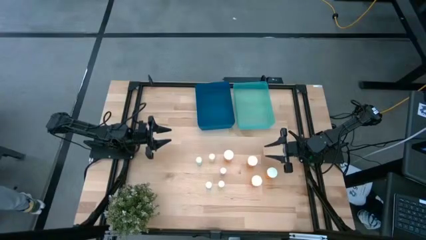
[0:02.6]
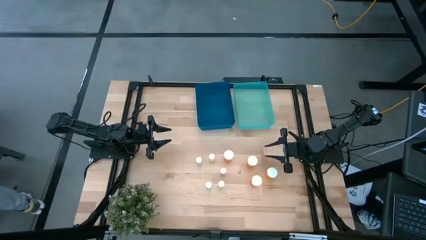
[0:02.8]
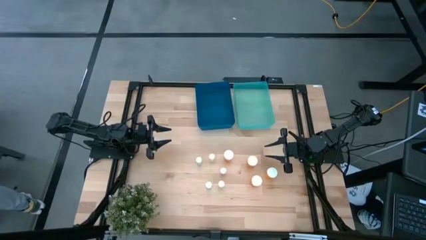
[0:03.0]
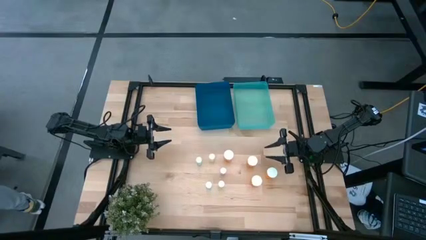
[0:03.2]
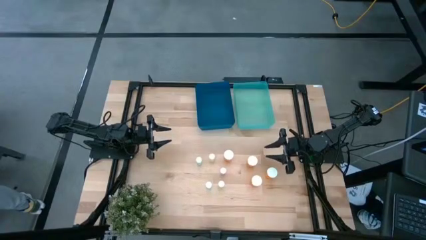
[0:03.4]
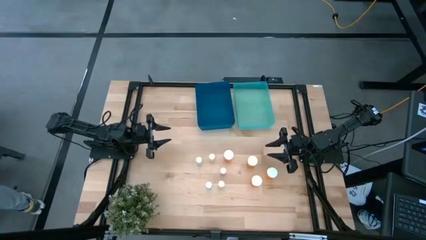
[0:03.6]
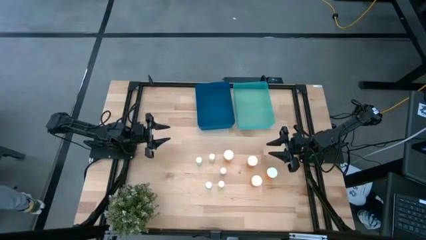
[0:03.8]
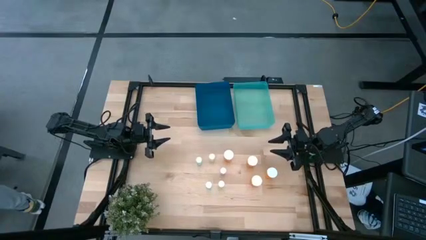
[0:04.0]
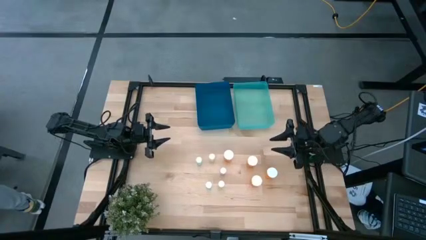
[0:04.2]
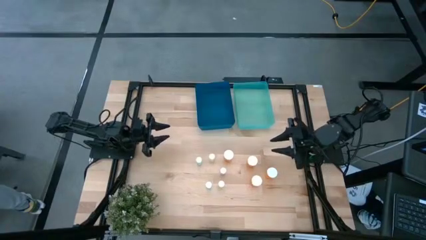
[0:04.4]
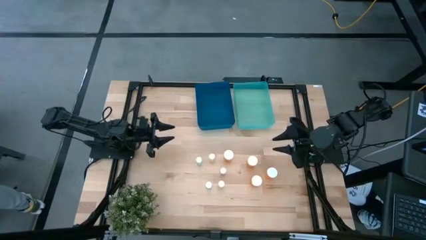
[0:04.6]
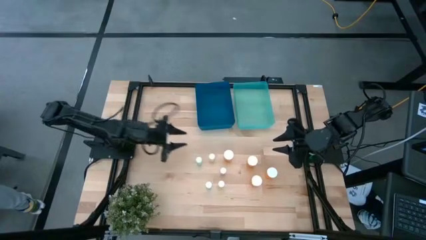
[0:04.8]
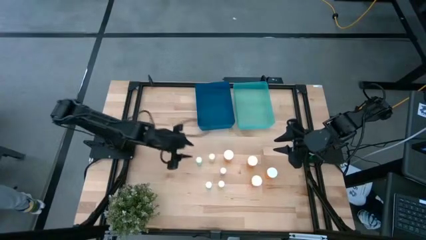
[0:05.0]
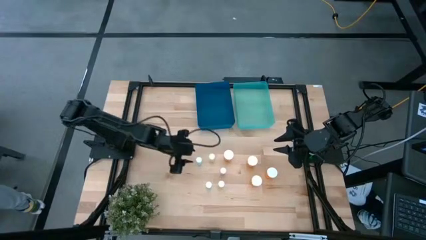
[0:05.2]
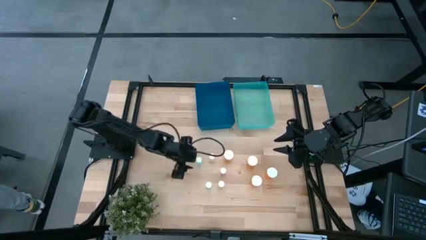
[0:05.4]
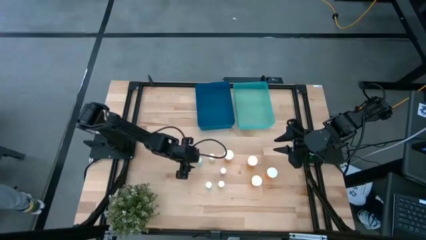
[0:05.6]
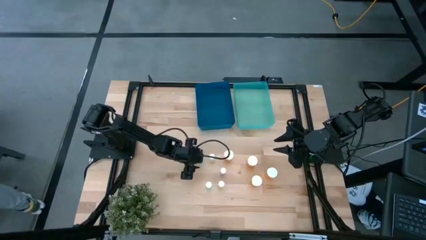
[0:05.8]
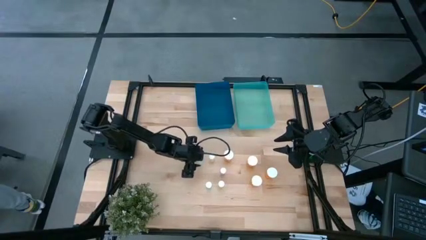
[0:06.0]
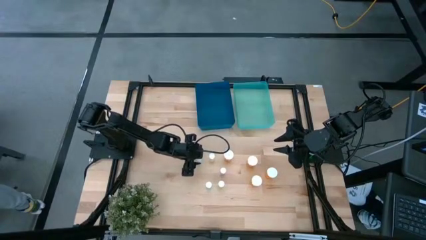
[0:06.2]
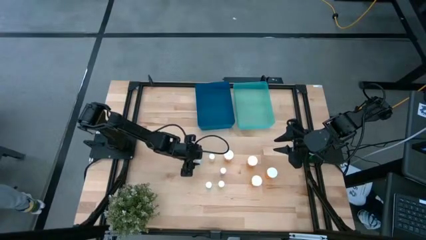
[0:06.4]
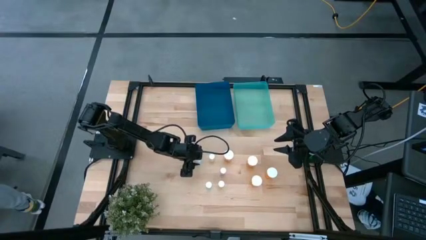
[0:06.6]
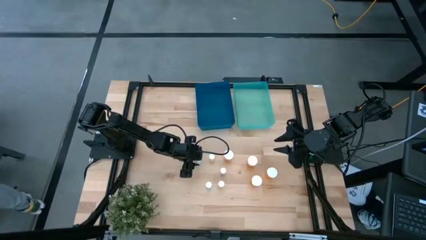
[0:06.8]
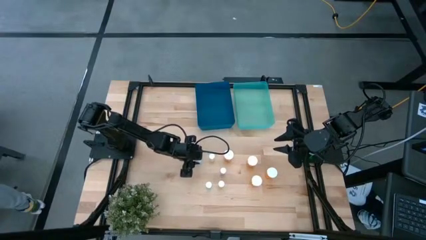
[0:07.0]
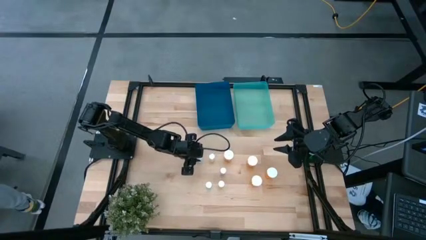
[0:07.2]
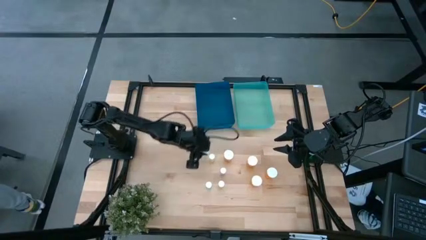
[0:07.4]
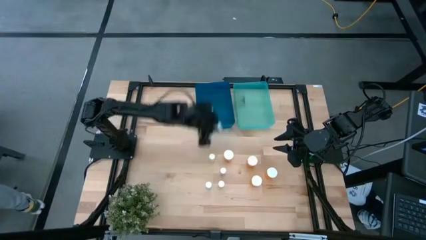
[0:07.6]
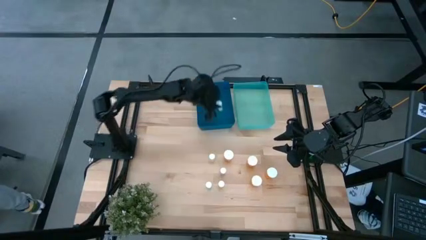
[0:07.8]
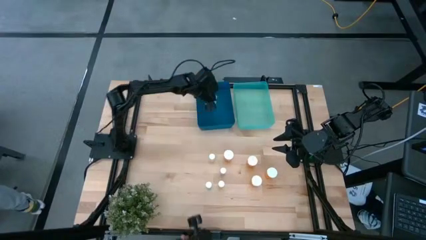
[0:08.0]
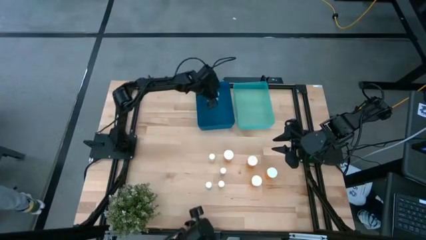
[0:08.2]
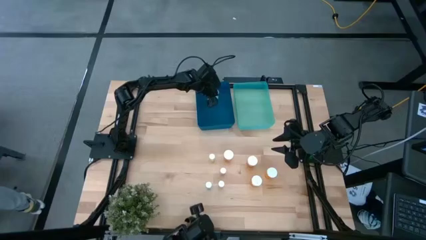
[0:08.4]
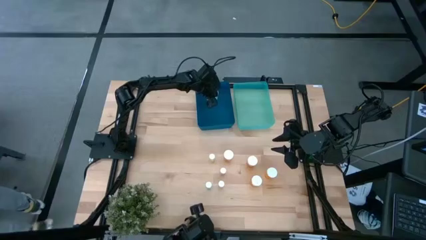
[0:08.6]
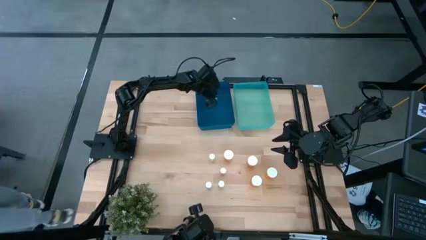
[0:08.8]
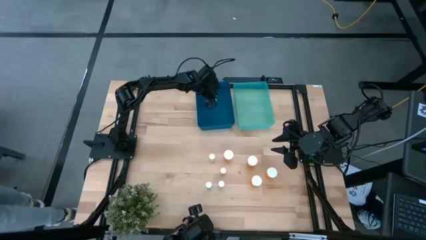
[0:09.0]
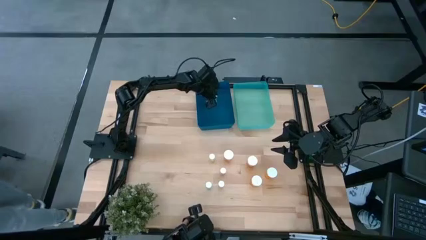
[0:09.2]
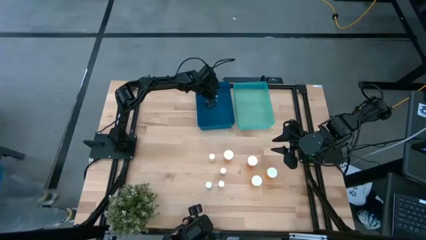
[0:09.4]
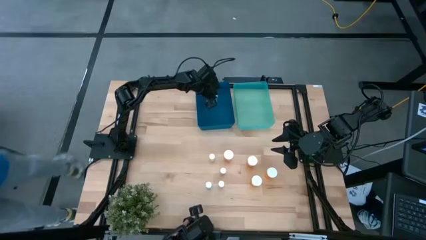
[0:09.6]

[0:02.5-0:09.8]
Task: Pick and place medicine bottles into bin by pill shape (circle, oval)
Put the blue pill bottle on the blue bin

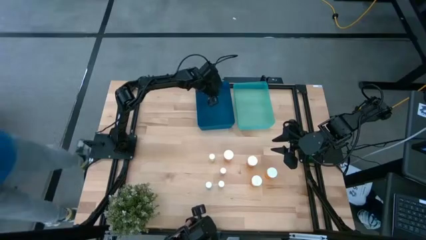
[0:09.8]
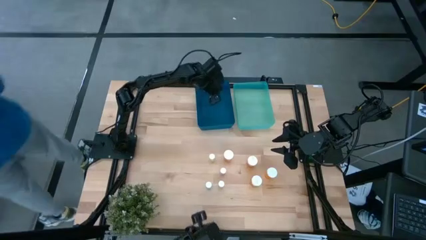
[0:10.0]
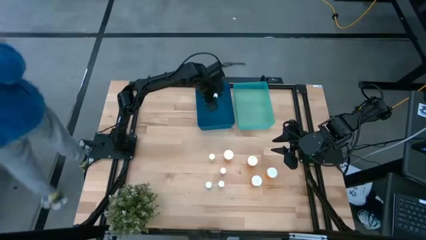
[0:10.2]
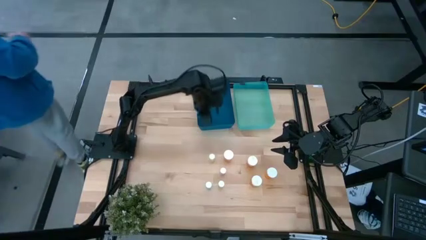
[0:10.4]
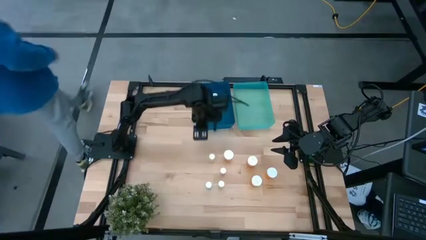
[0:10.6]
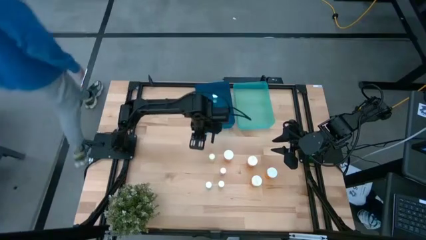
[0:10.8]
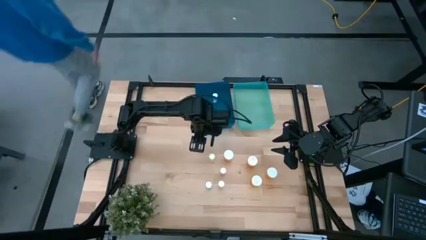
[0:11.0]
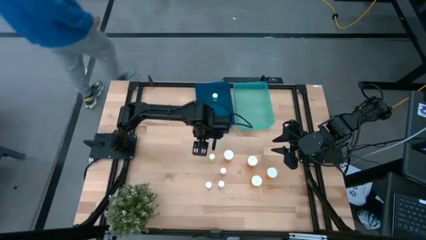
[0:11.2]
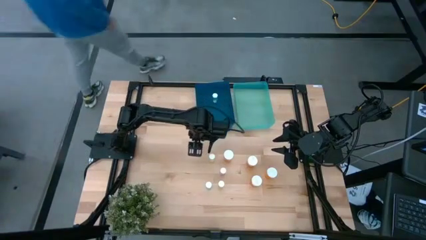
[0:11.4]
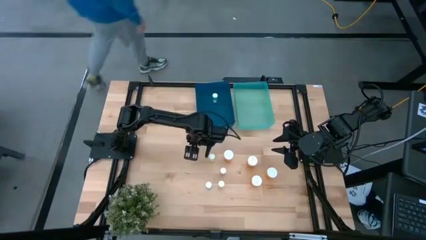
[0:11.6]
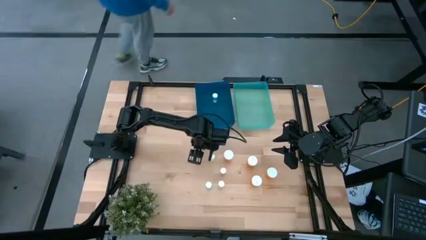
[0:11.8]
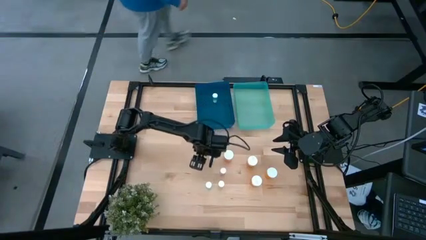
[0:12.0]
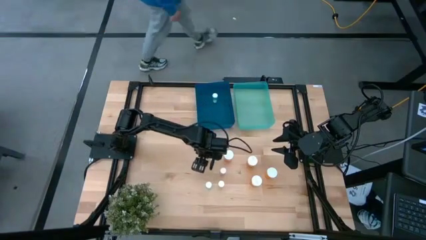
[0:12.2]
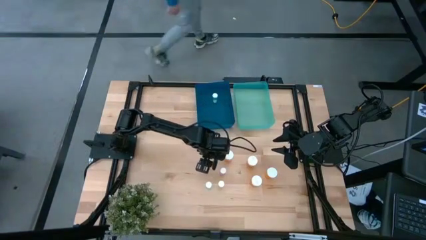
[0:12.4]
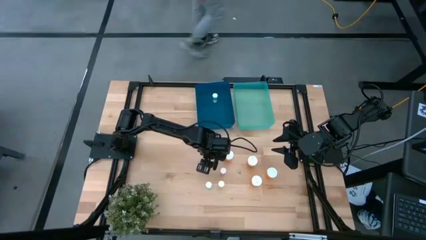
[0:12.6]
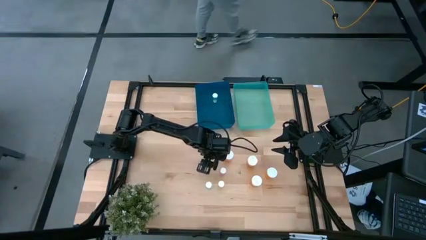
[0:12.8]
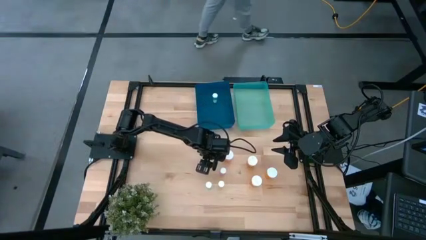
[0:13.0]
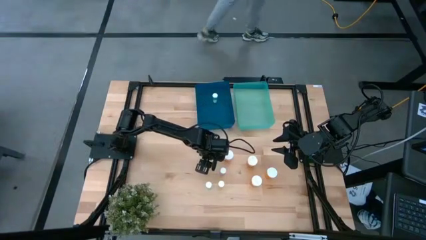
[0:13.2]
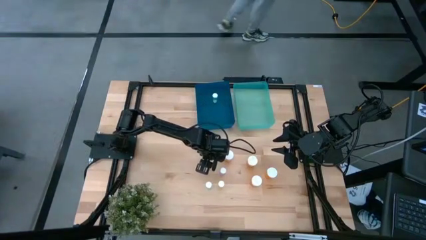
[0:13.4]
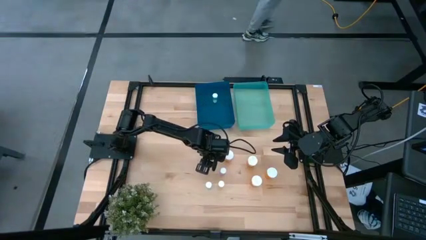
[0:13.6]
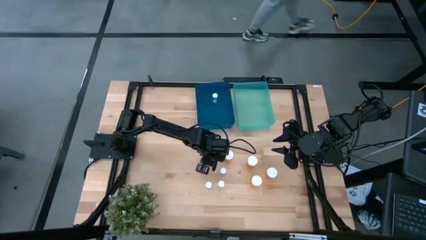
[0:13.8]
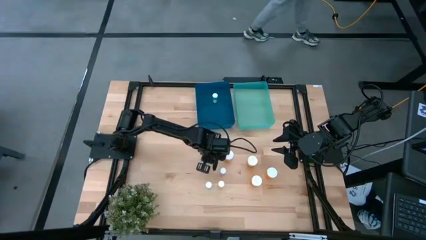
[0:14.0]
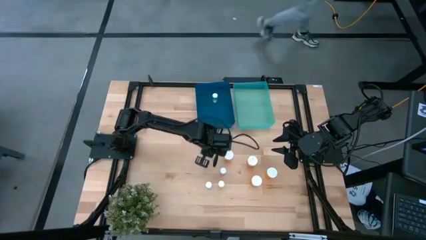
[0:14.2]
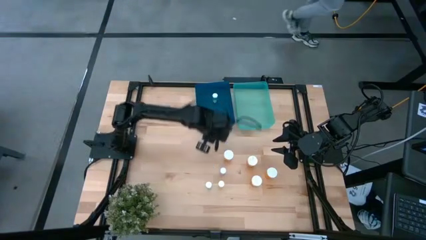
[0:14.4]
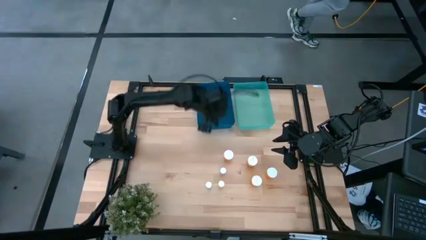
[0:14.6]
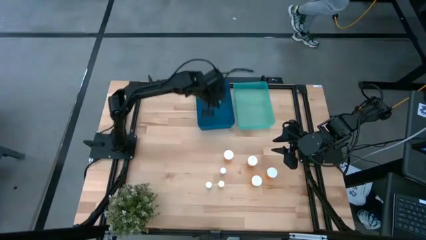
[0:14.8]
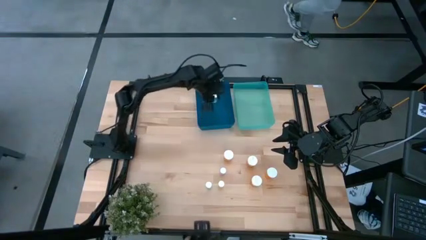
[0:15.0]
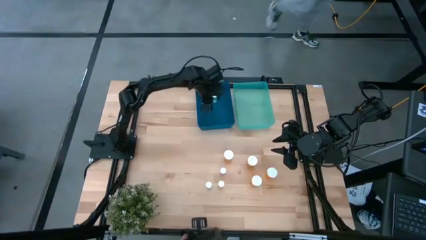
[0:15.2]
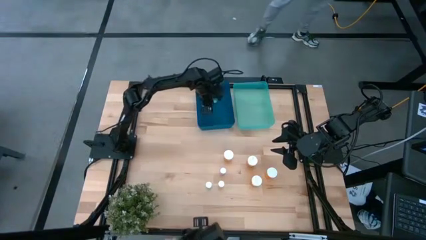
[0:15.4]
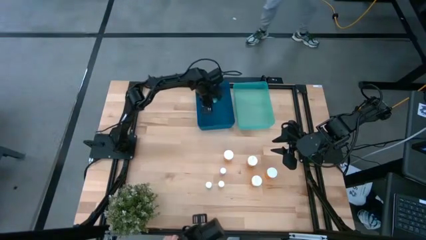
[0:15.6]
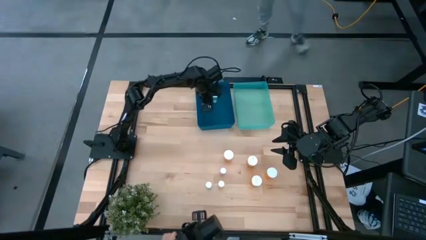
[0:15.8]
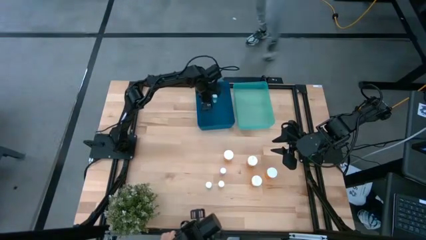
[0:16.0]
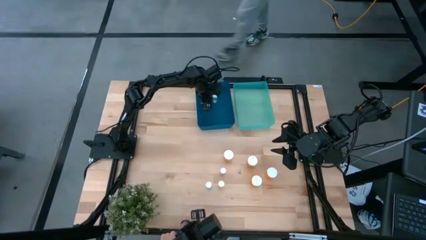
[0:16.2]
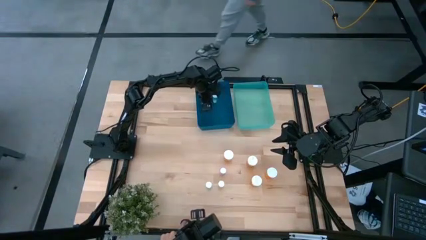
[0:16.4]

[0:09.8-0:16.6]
Put the yellow pill bottle on the blue bin

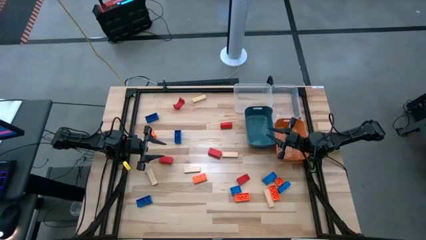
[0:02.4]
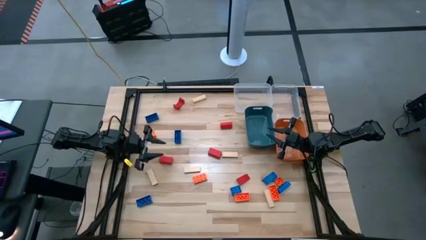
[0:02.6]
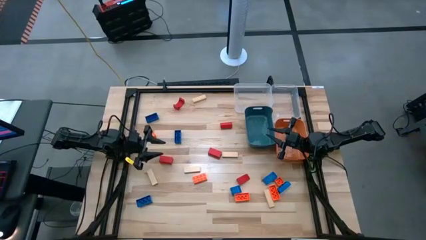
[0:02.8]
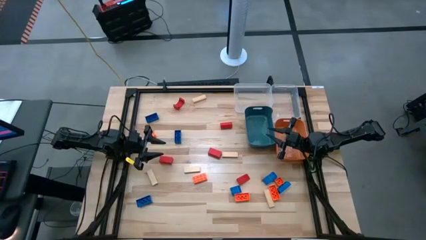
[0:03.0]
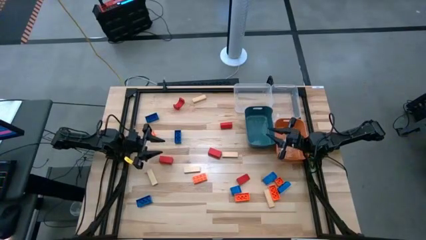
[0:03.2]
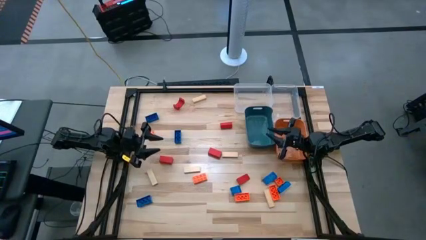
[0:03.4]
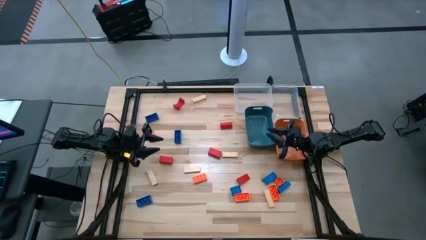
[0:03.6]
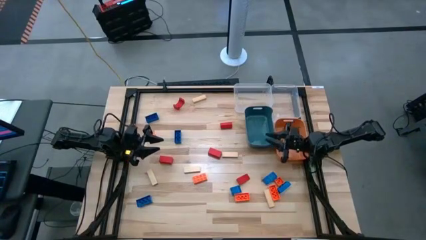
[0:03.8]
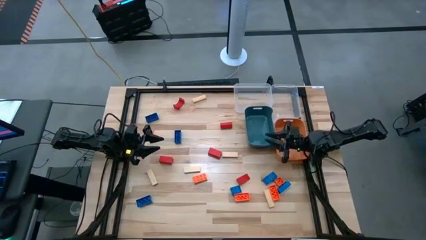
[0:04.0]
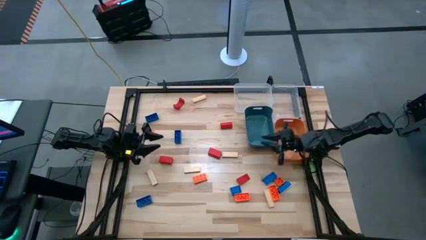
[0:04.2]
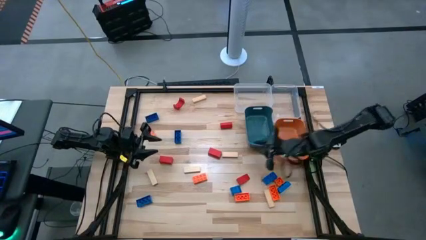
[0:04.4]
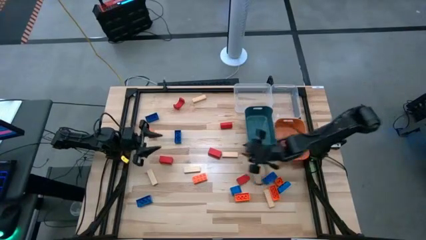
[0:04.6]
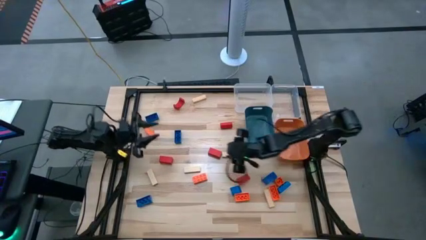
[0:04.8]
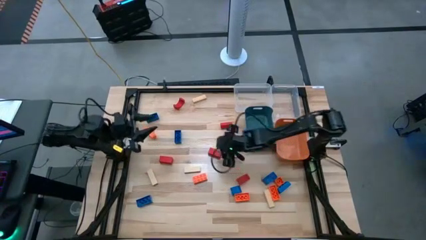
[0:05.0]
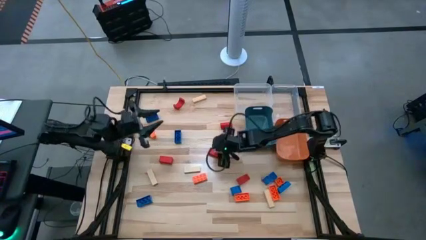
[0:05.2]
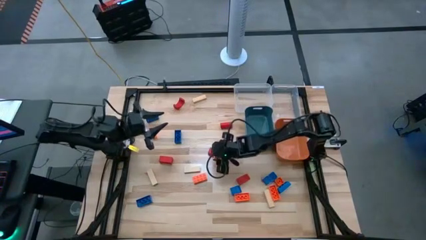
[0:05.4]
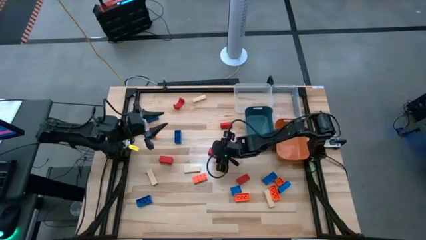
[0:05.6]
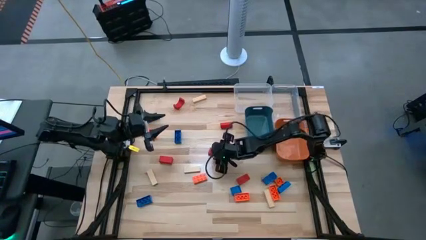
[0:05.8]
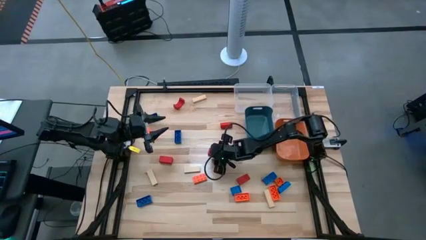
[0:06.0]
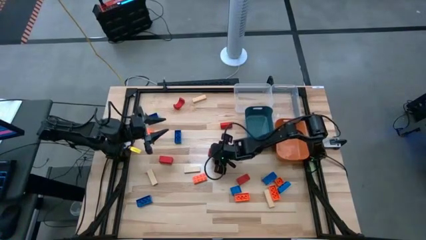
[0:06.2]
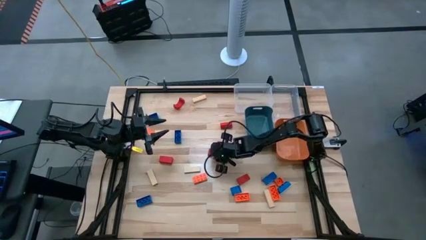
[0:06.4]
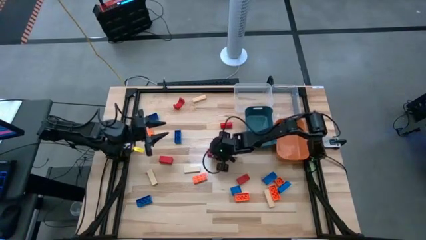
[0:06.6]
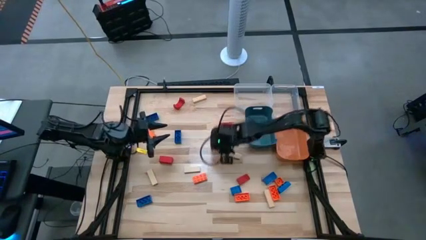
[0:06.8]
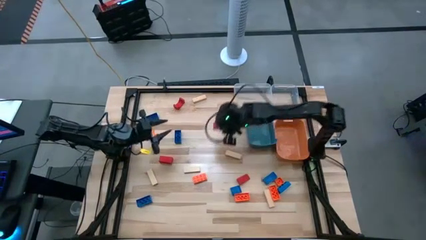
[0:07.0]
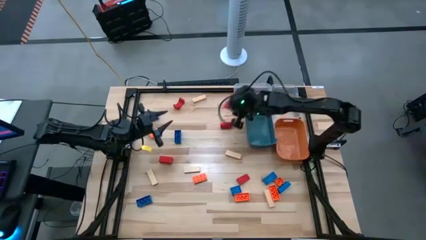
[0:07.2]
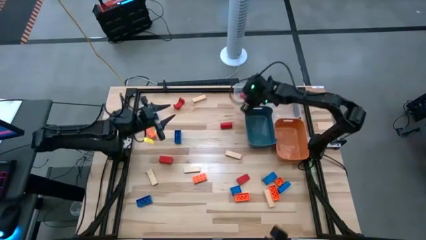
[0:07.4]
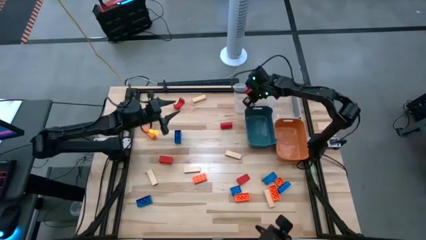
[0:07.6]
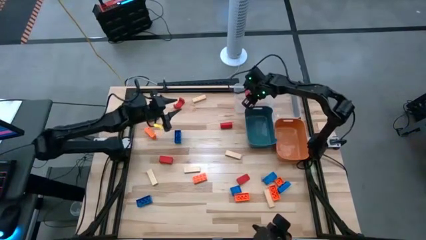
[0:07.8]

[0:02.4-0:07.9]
Task: Sort blocks
Put the red block into the left transparent bin
